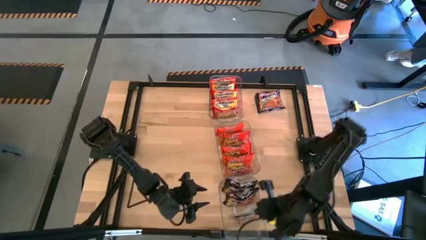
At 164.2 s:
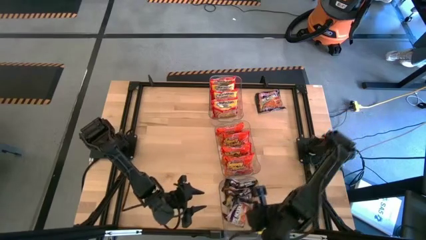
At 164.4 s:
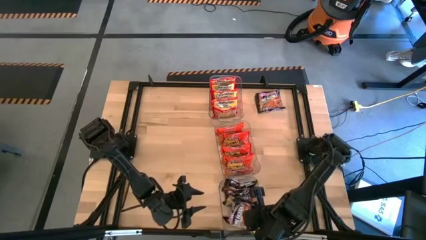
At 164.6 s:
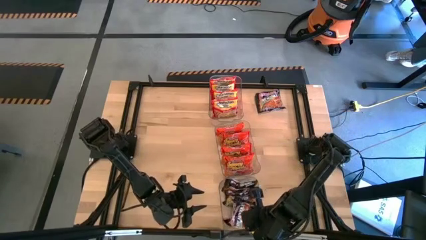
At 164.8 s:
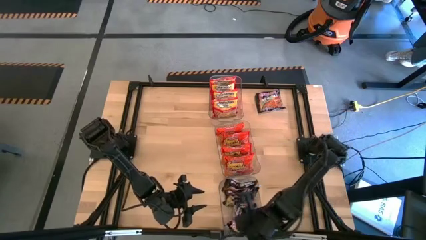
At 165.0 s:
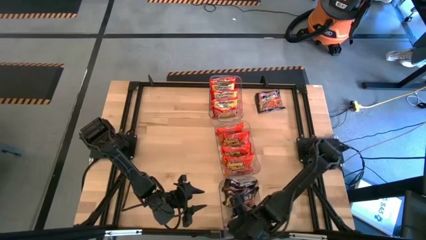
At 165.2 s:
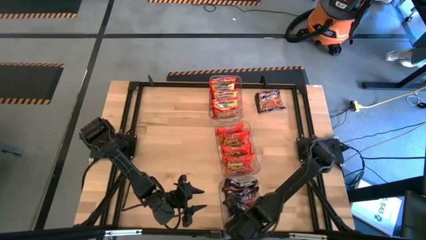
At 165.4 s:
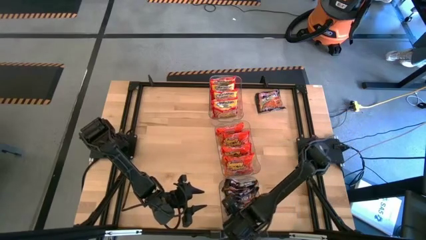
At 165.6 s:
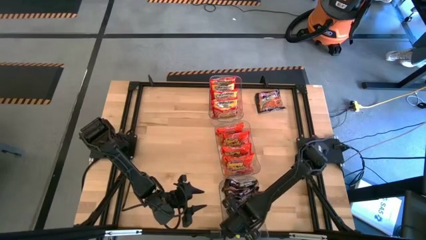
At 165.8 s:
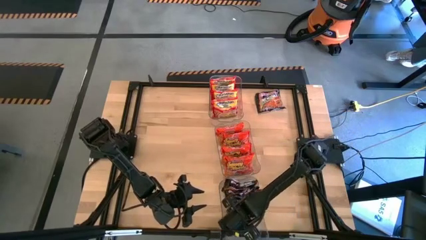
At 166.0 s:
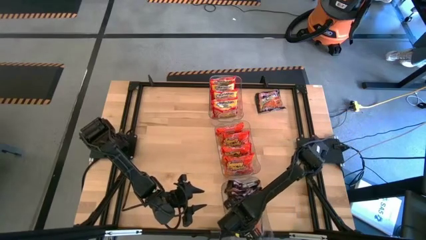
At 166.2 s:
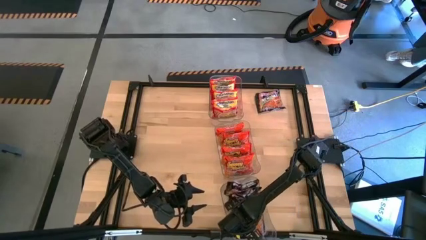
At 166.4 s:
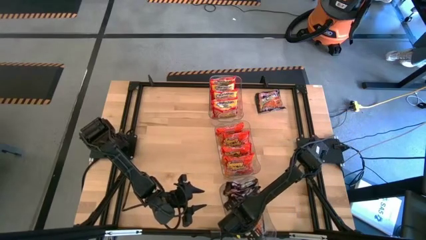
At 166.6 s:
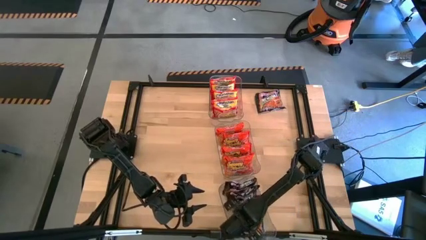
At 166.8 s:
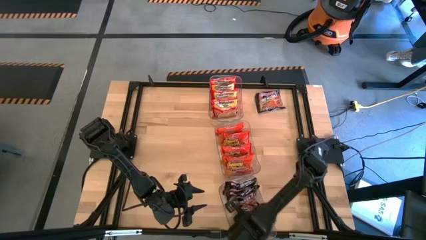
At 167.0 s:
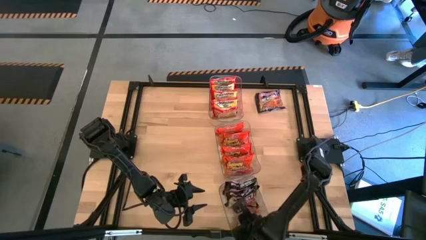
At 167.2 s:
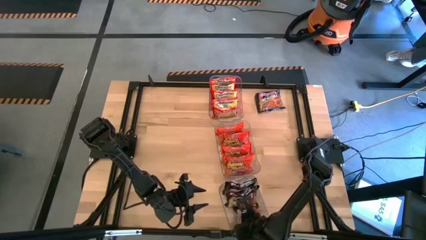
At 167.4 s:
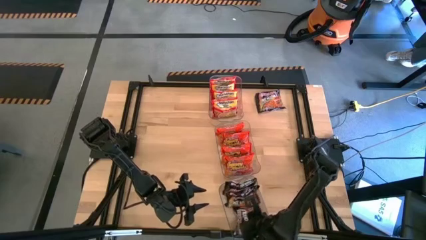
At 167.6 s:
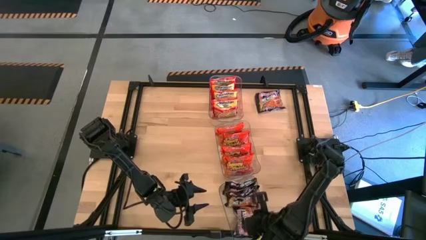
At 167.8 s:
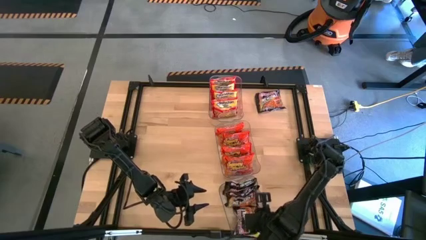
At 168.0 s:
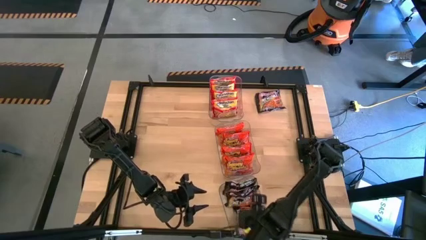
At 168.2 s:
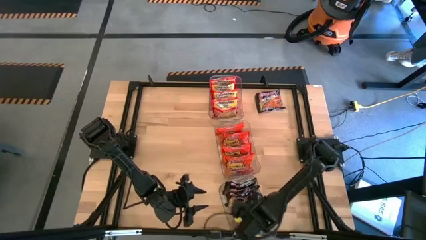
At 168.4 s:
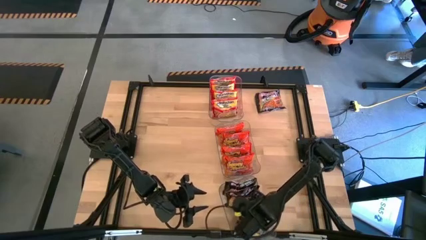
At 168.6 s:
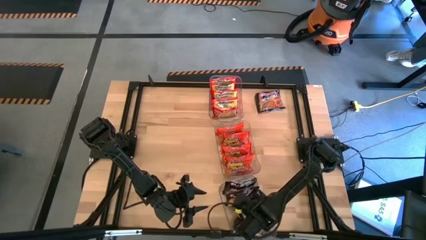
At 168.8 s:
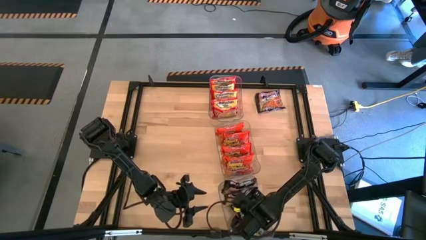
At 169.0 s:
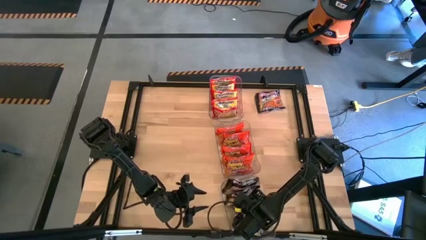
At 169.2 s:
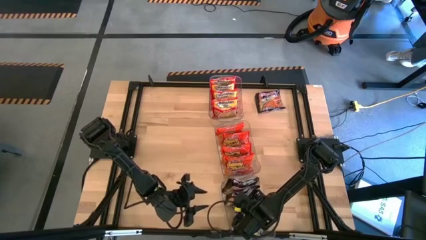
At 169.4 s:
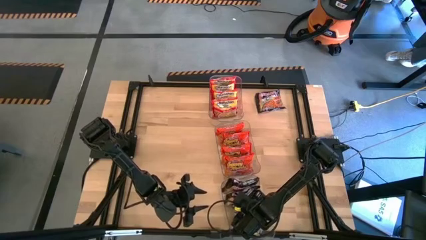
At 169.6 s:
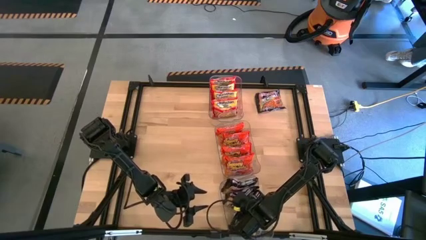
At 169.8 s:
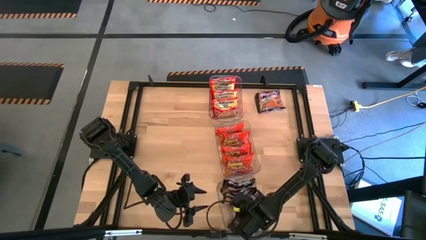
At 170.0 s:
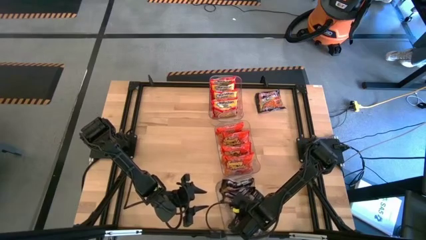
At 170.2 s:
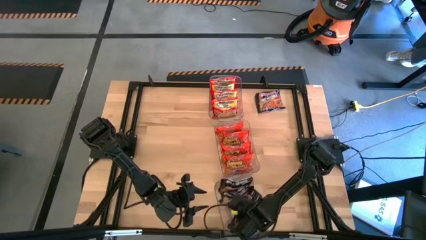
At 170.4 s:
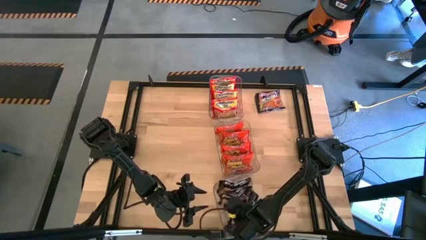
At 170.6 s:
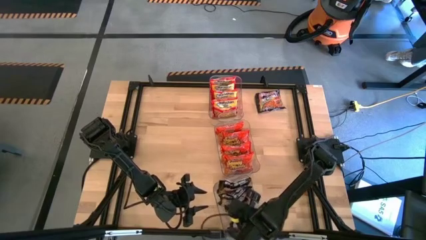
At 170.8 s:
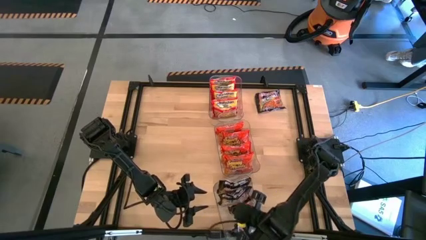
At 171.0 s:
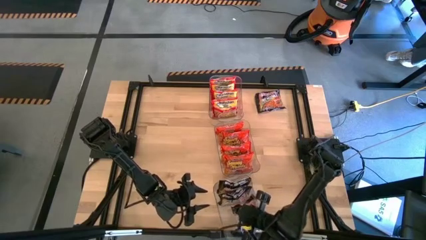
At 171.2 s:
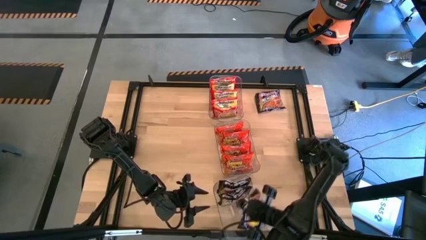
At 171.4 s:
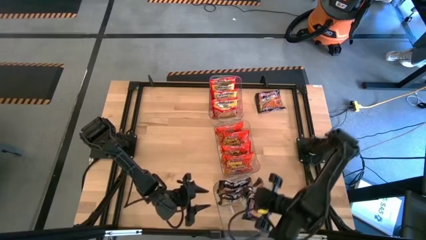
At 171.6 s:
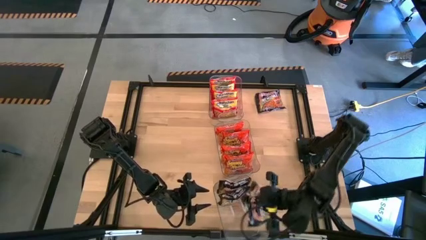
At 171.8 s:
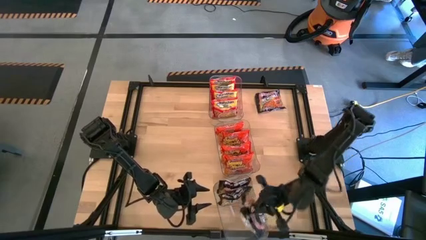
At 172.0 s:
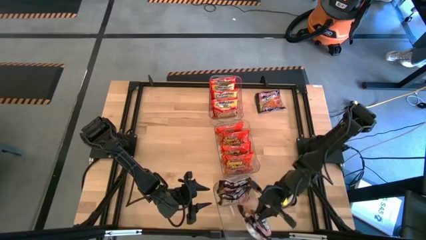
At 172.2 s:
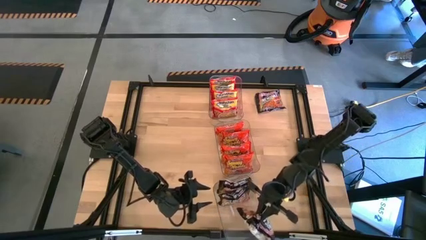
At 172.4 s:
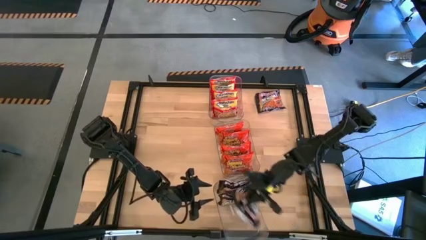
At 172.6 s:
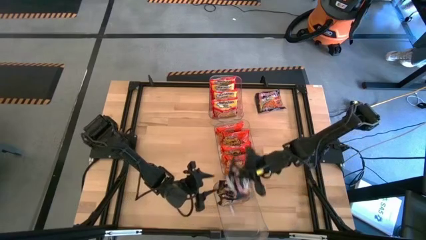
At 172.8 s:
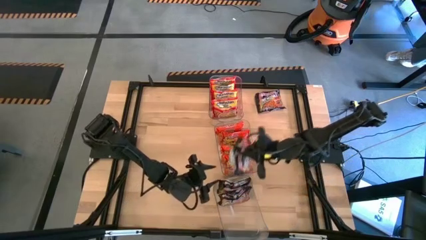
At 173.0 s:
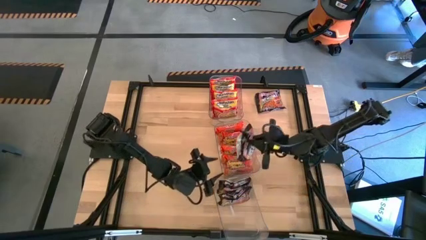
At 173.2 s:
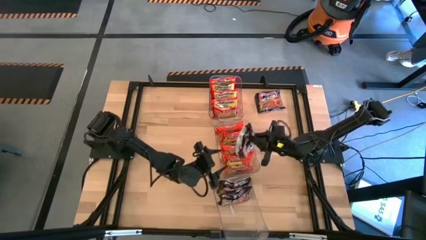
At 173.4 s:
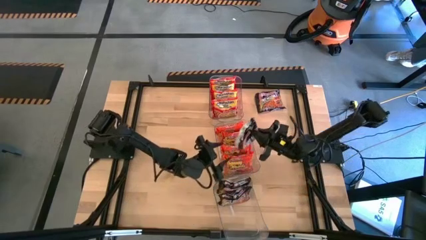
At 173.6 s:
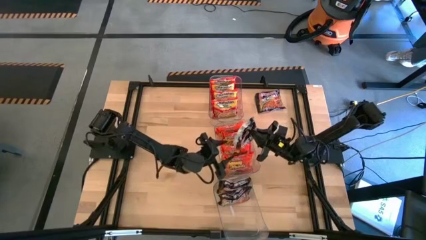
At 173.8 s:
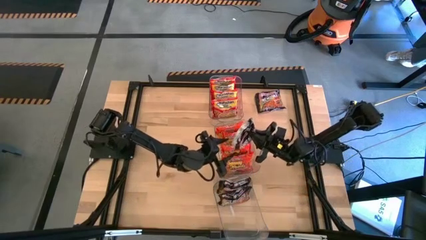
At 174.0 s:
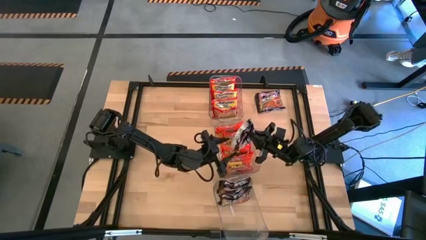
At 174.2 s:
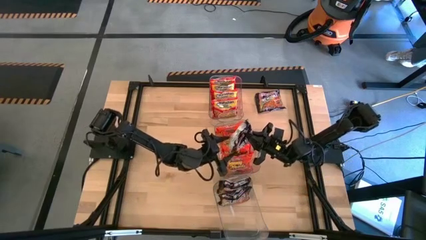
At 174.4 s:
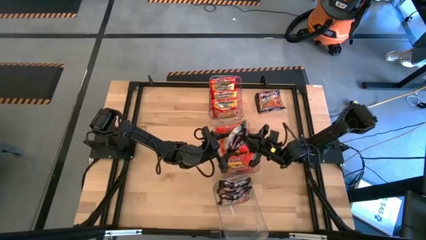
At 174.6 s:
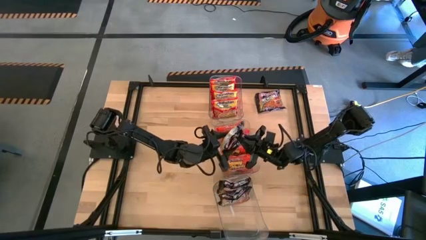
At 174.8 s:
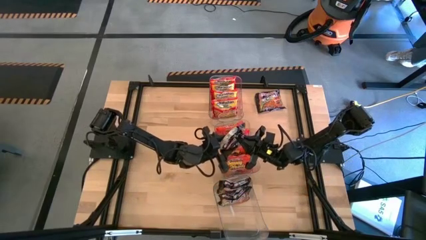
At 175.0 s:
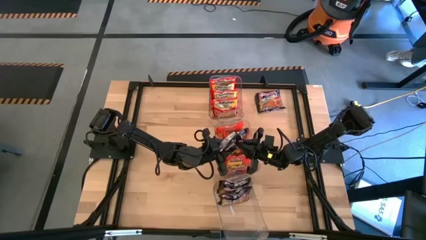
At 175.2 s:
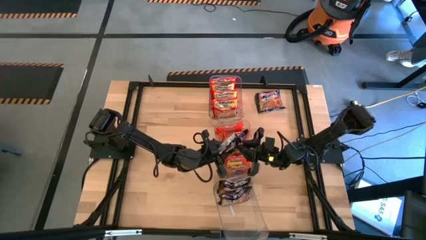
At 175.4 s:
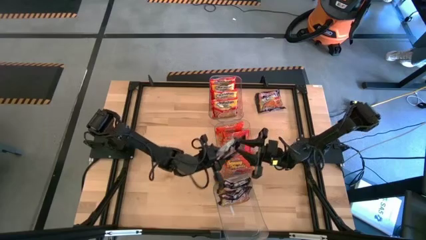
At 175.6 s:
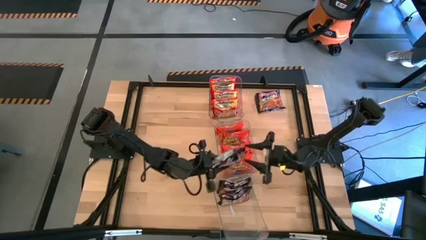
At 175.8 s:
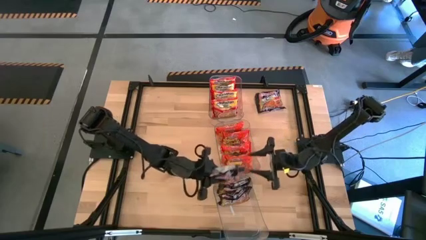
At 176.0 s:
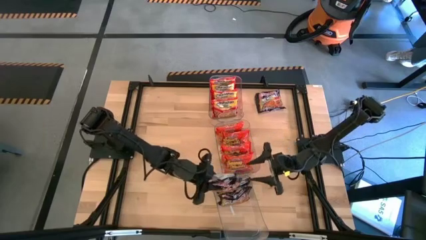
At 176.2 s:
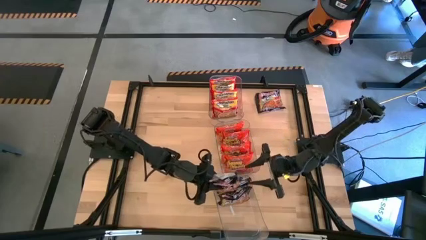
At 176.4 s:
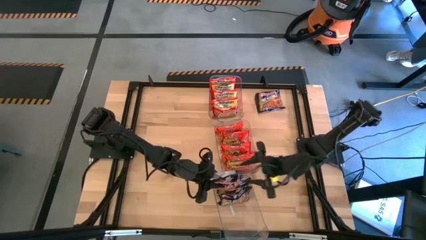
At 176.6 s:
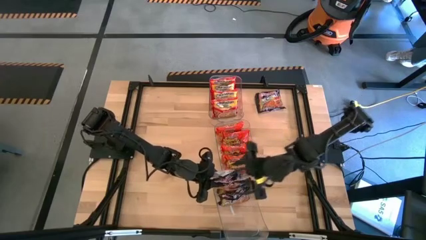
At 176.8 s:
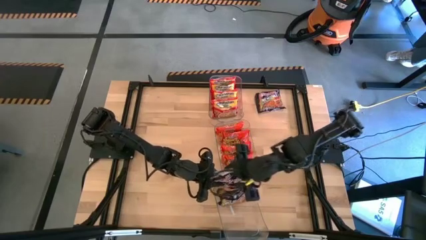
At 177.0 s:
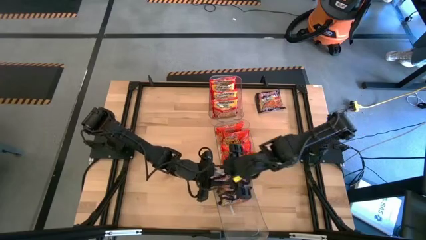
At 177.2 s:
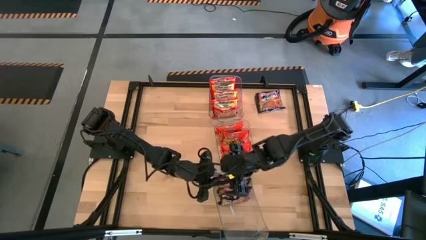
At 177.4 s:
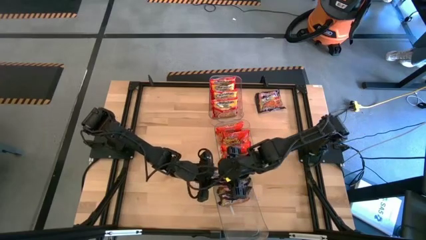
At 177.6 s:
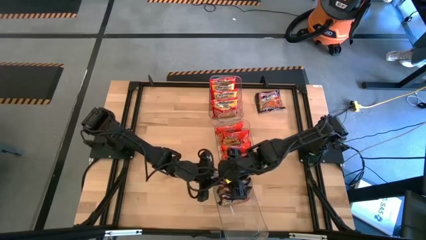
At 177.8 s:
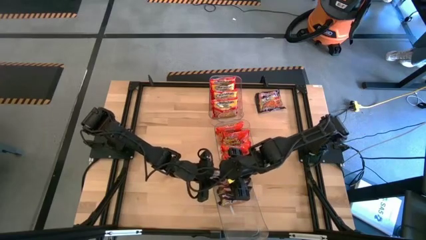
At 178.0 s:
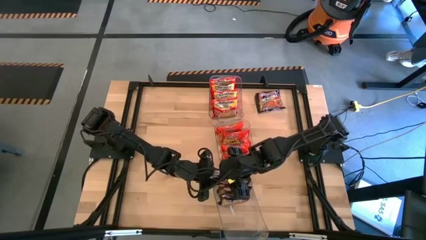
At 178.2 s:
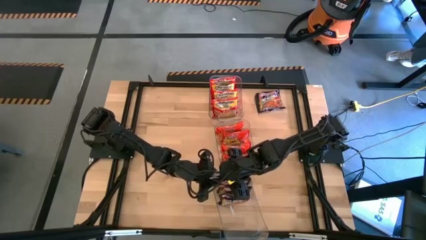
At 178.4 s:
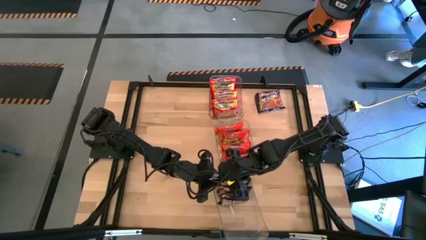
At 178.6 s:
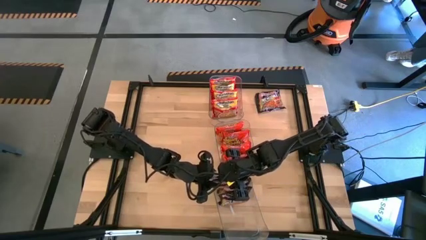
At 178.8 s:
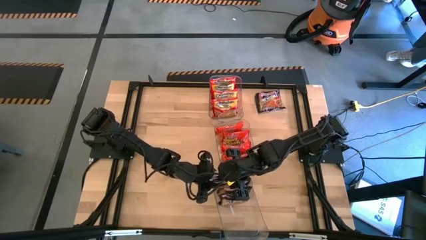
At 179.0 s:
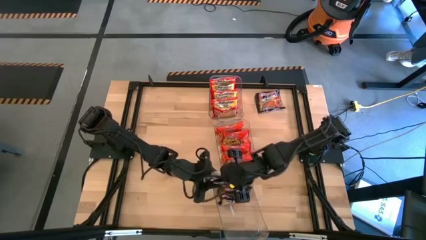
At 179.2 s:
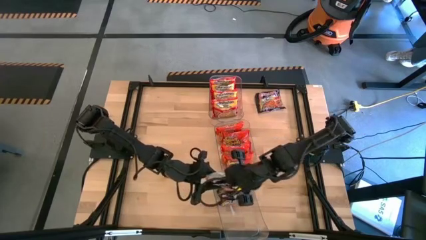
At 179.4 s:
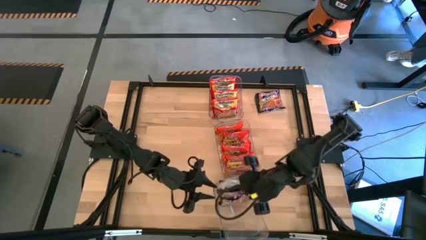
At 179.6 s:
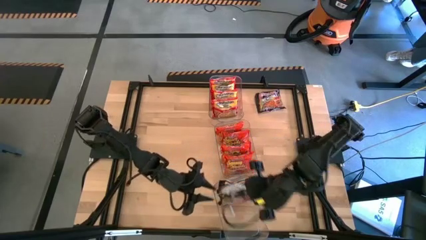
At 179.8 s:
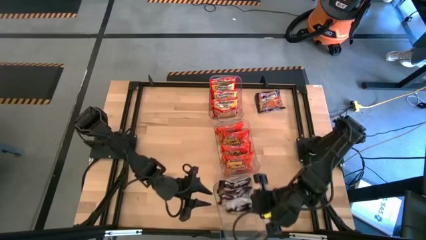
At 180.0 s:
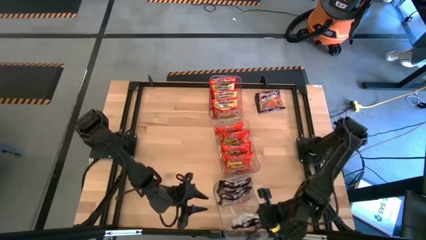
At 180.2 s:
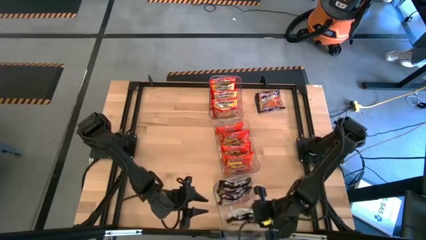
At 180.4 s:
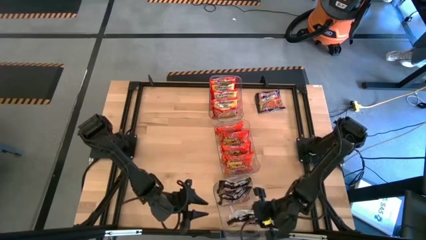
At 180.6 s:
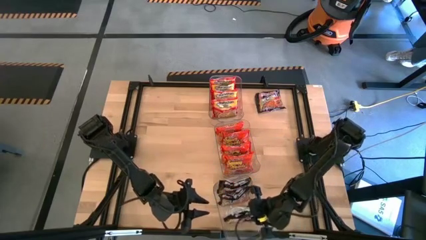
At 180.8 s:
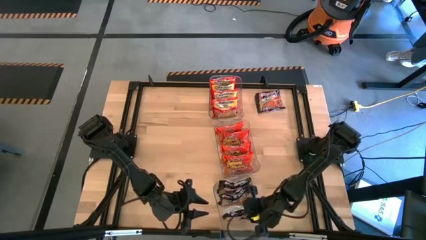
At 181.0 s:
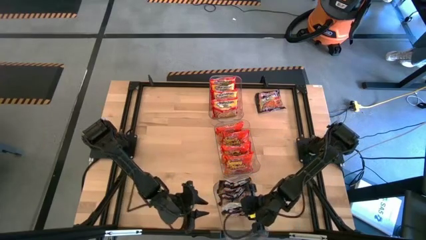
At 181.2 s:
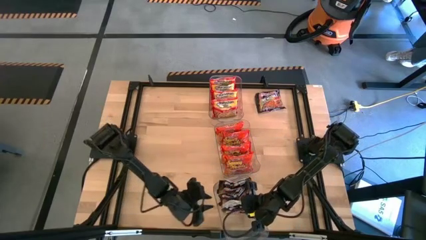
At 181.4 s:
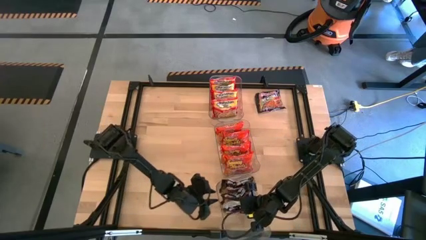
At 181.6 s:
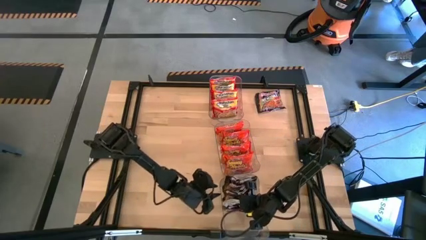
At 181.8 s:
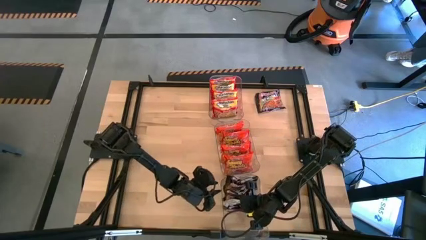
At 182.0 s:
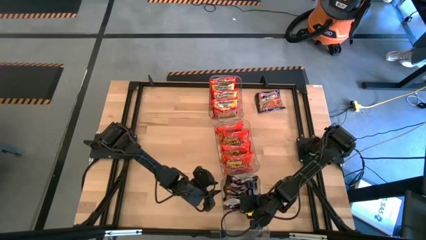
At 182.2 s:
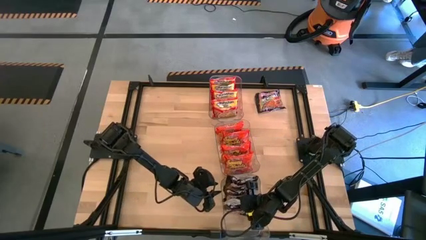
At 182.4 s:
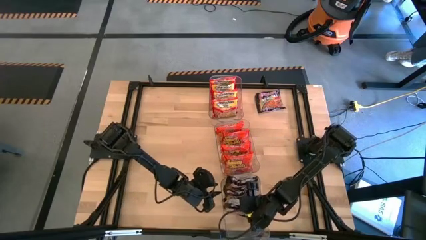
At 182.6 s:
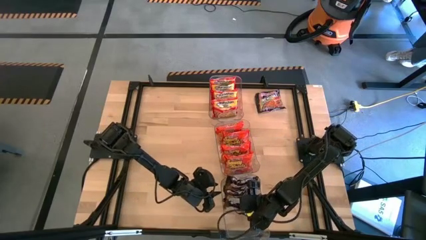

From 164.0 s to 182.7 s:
Task: Sort Maruchan noodles
Put the orange noodle pack into the middle transparent bin
